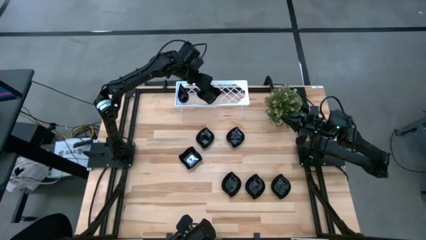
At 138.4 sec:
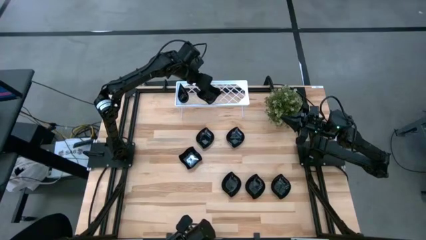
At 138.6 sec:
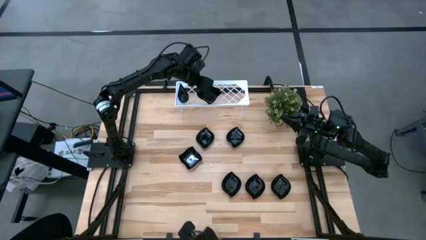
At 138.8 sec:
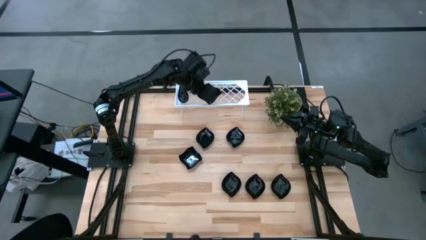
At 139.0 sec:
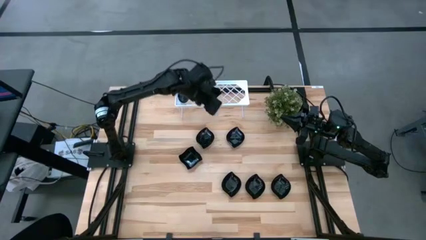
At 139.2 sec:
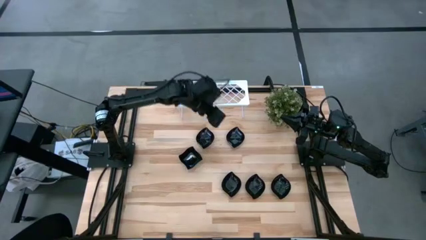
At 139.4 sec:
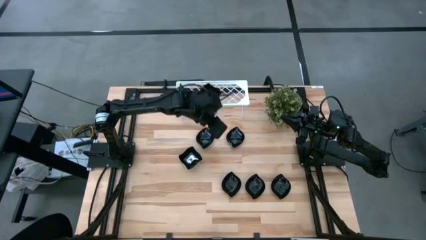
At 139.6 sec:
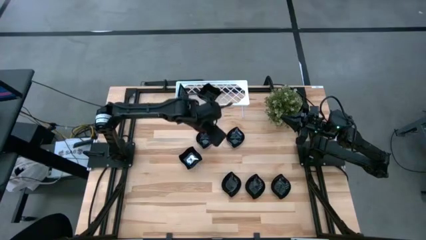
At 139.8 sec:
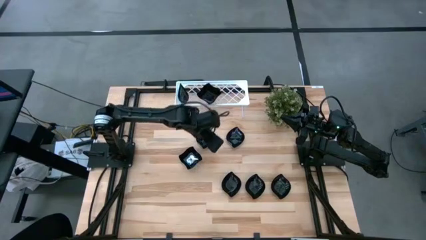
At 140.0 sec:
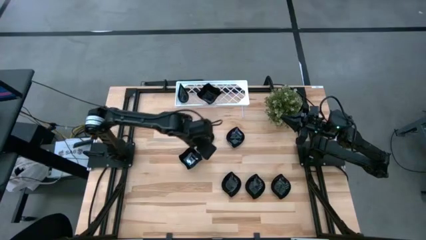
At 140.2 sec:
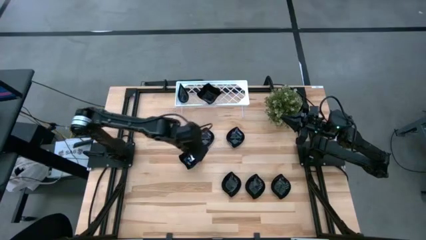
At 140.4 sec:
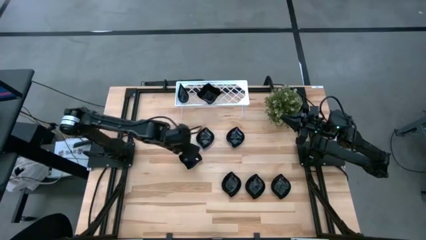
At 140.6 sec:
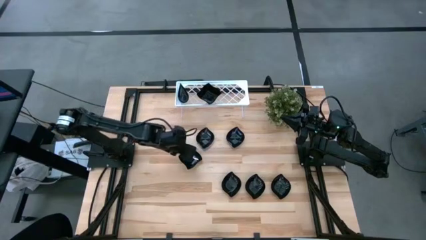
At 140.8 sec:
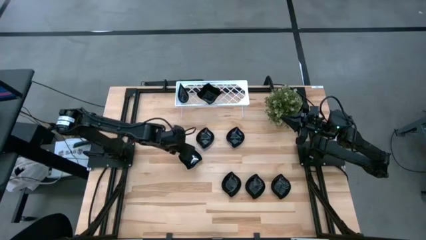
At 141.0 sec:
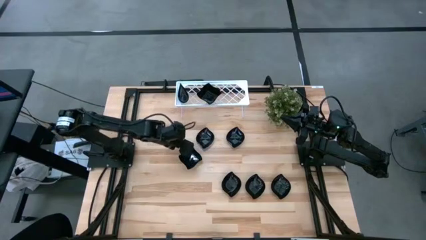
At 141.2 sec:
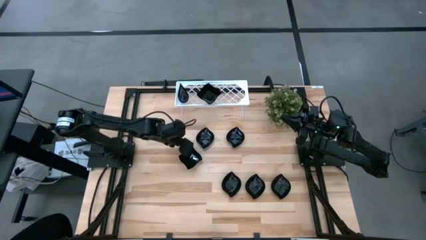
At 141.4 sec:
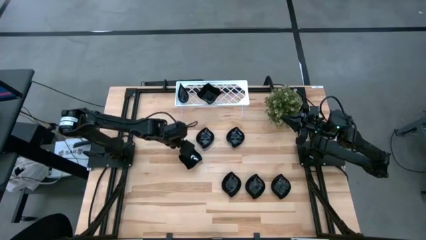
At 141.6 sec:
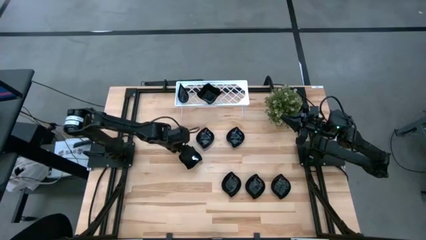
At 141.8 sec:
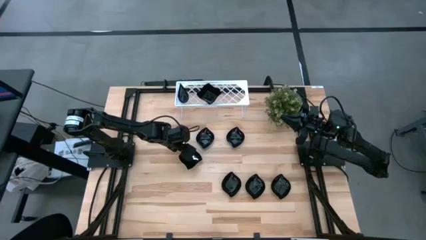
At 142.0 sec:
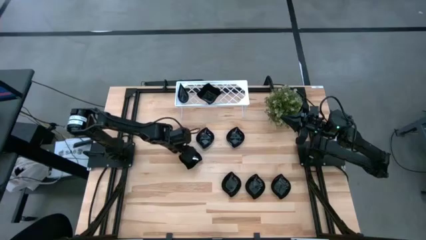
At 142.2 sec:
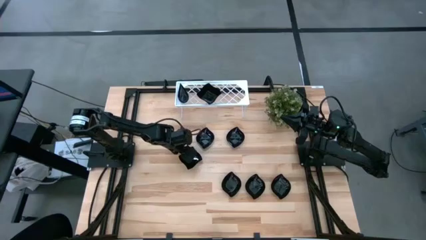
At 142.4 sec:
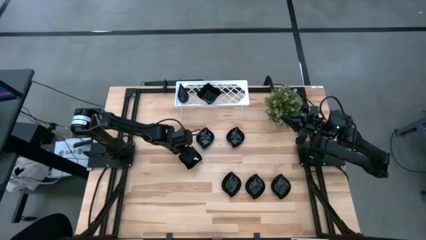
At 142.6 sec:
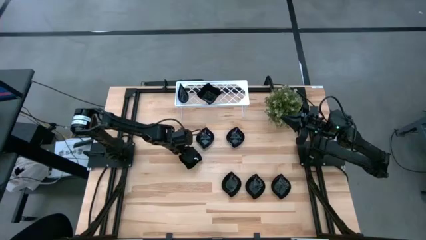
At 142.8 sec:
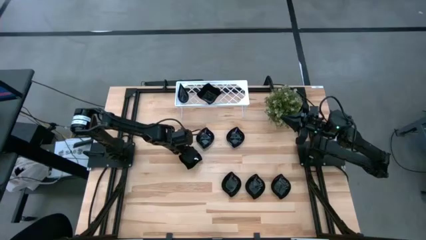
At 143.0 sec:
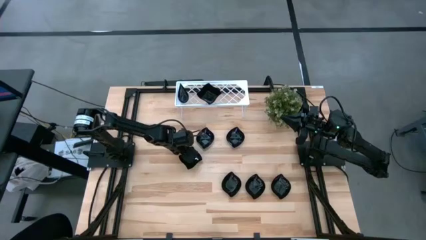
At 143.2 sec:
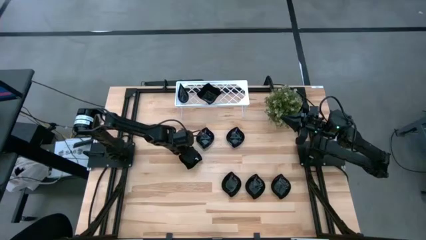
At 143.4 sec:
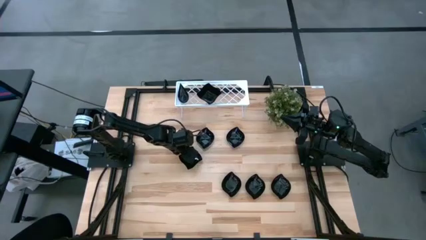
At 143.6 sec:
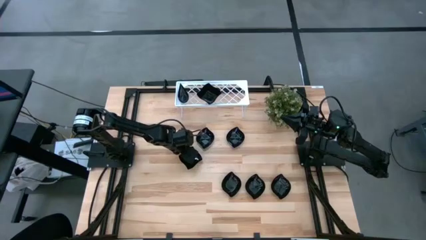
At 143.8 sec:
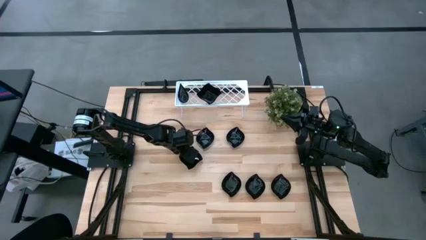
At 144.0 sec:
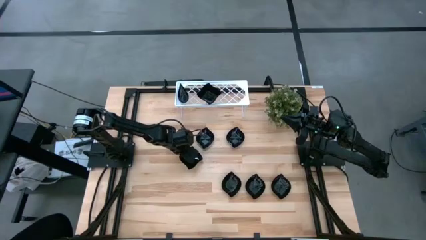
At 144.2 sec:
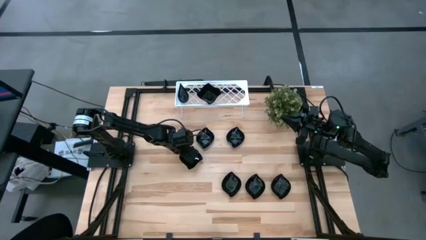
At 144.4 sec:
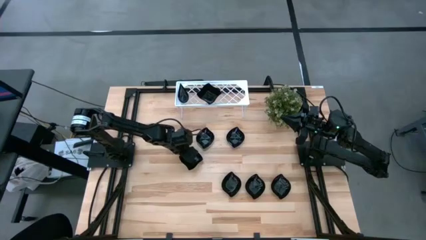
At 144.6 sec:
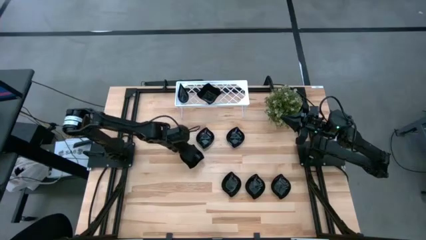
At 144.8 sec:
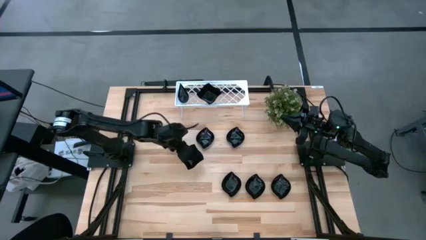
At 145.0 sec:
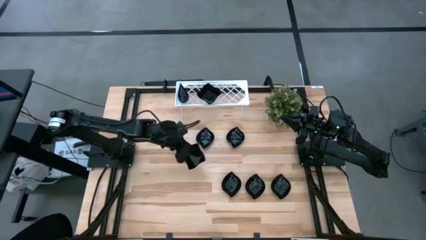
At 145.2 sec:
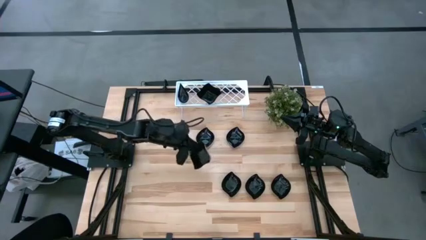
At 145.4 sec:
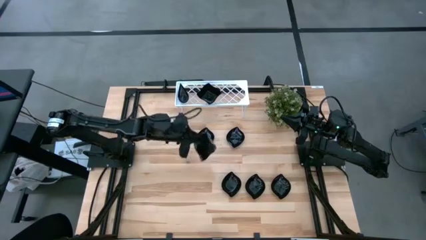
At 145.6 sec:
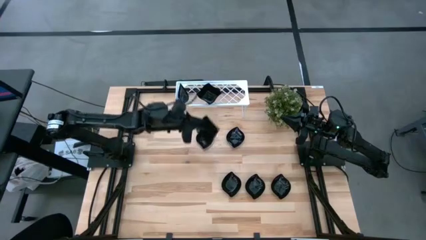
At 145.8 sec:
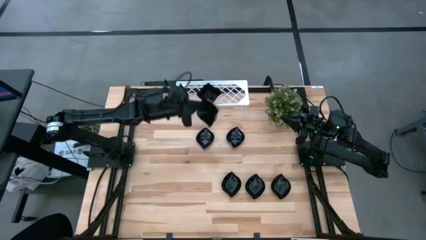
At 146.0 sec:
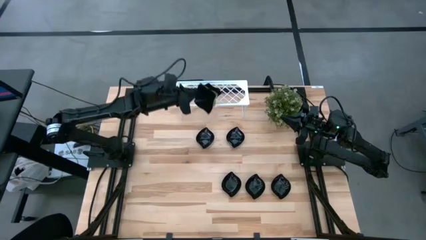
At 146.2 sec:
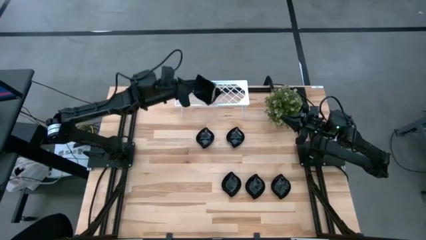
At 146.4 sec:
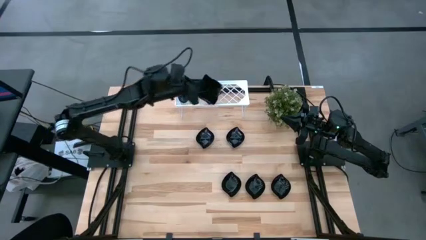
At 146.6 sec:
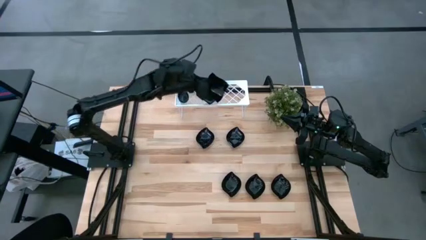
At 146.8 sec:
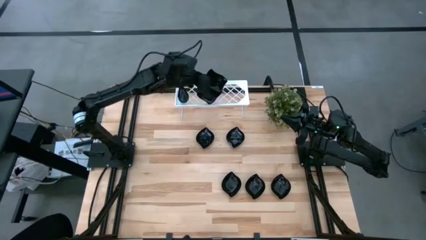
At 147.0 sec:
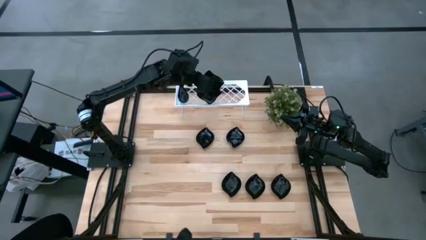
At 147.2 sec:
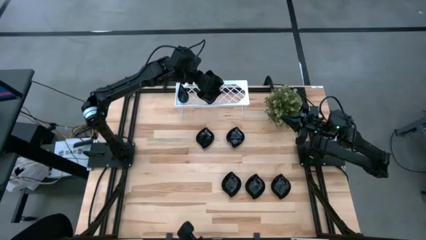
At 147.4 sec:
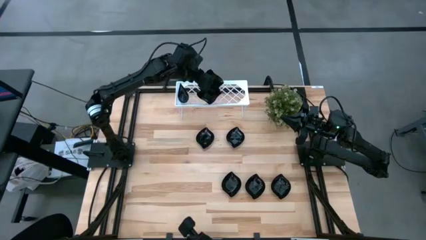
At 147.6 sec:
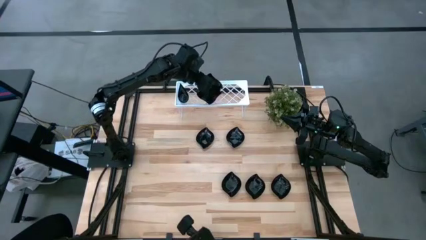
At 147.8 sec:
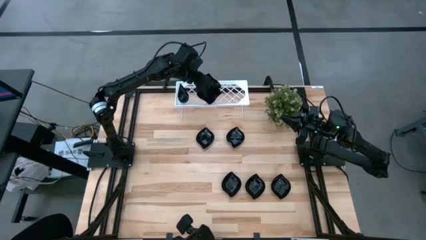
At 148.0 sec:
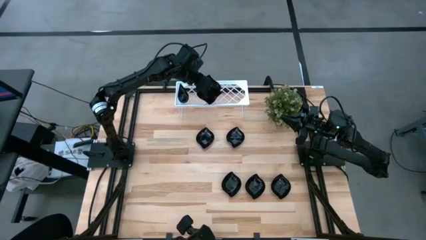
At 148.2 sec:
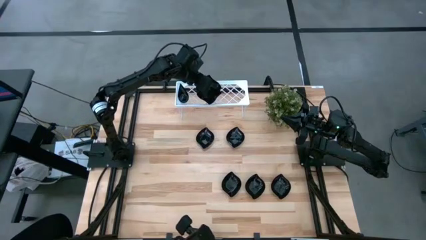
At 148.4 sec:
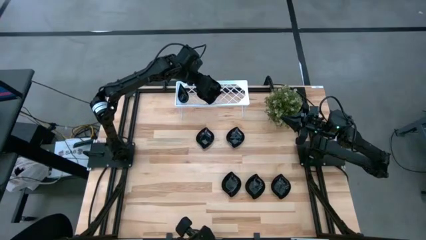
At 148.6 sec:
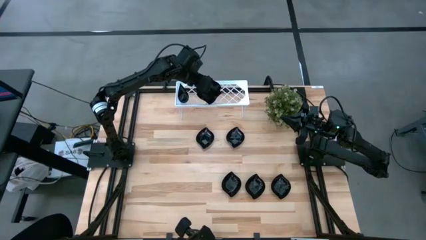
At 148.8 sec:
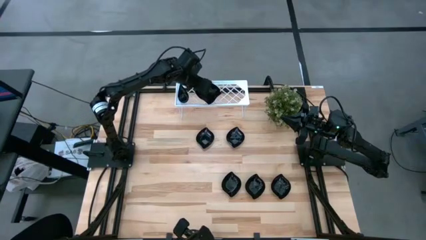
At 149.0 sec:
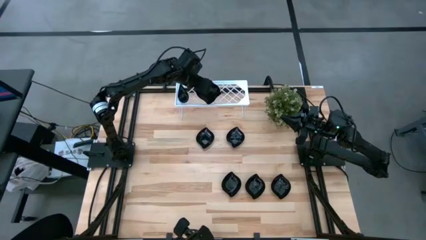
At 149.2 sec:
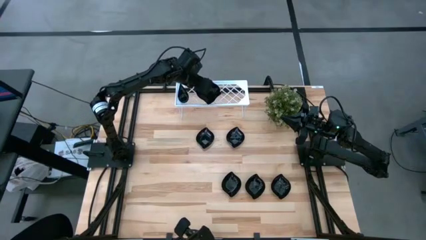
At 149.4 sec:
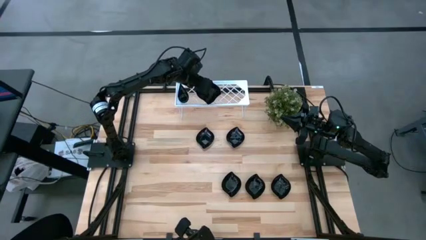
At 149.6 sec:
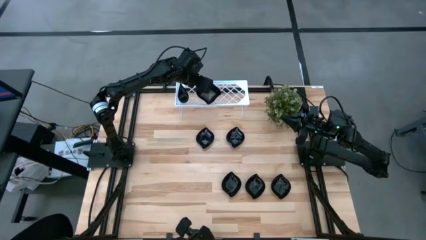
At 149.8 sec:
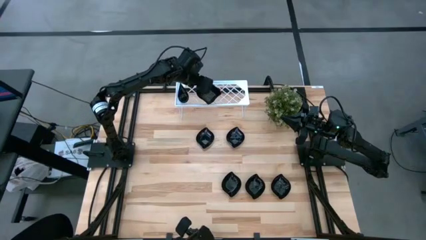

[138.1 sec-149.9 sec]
Task: Pick & Place Mini shaped plates
Stack the distorted square-shaped plate on top of the distorted square-shaped plate on the shelf

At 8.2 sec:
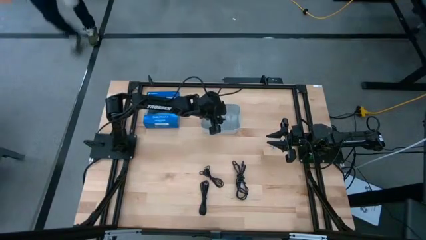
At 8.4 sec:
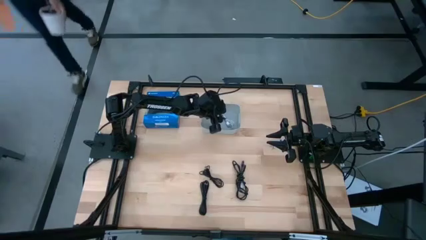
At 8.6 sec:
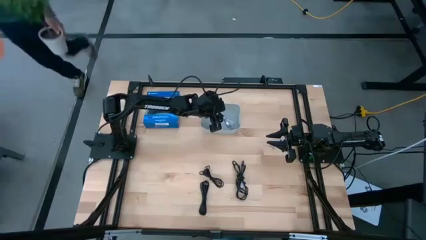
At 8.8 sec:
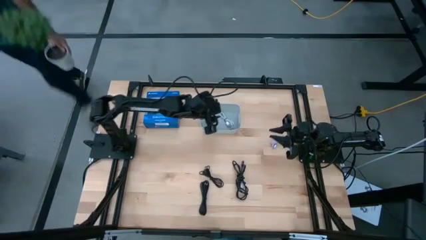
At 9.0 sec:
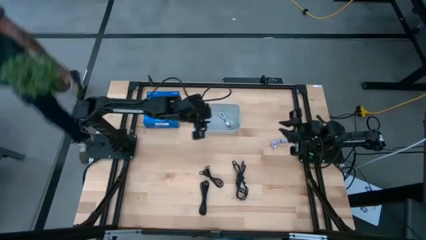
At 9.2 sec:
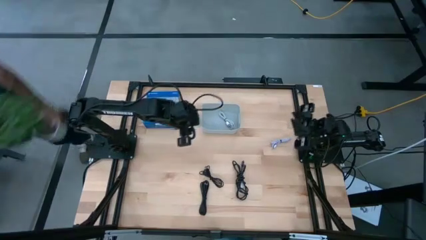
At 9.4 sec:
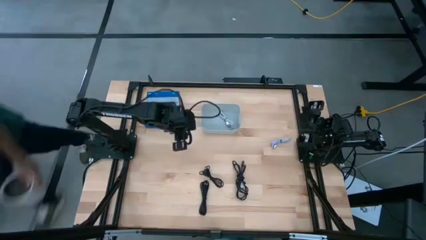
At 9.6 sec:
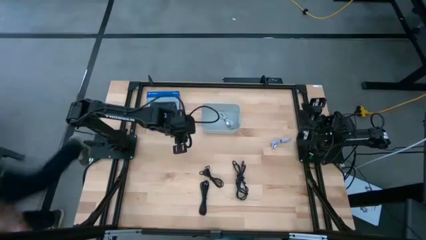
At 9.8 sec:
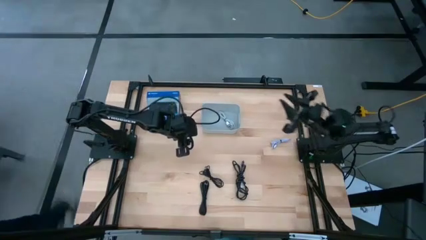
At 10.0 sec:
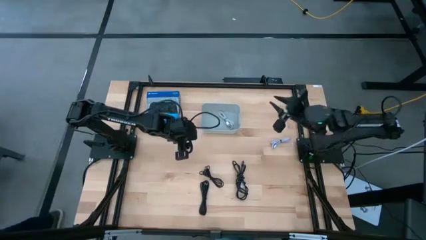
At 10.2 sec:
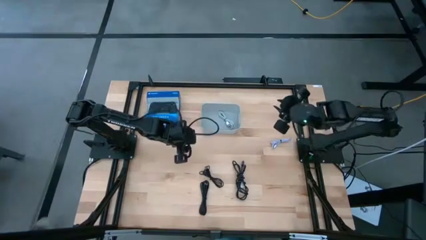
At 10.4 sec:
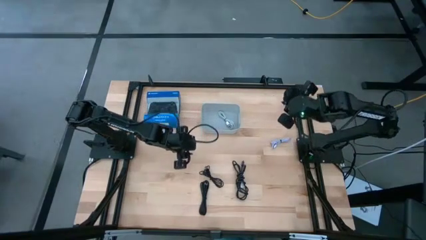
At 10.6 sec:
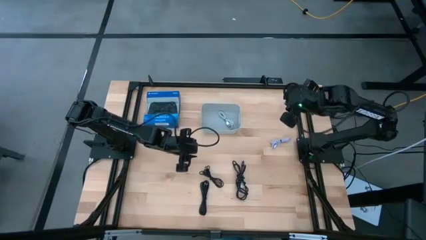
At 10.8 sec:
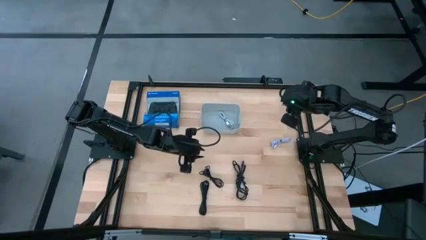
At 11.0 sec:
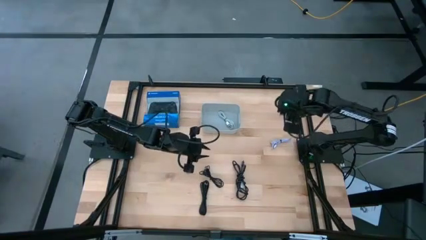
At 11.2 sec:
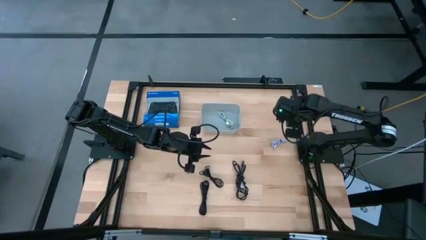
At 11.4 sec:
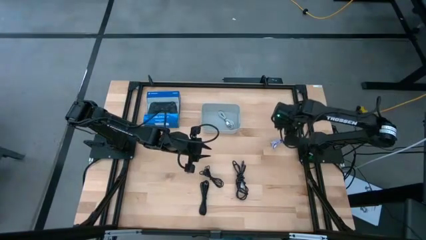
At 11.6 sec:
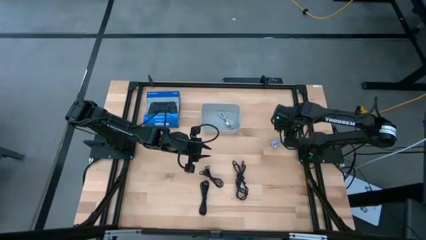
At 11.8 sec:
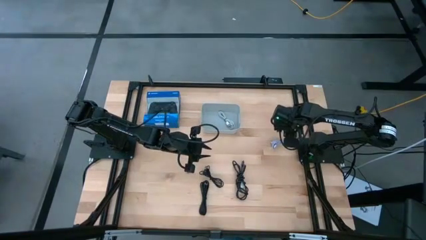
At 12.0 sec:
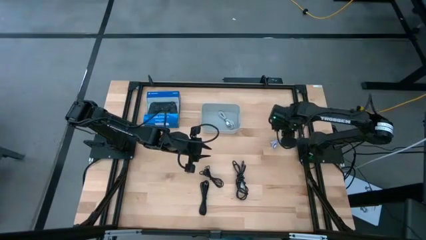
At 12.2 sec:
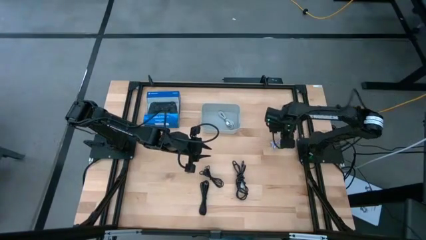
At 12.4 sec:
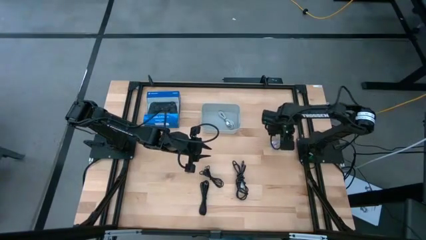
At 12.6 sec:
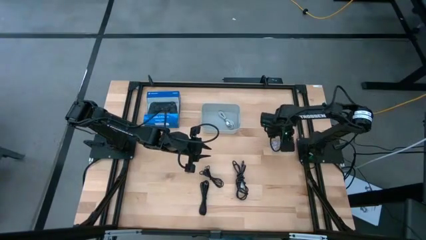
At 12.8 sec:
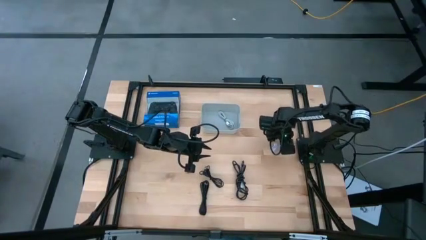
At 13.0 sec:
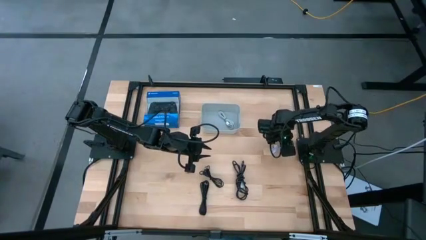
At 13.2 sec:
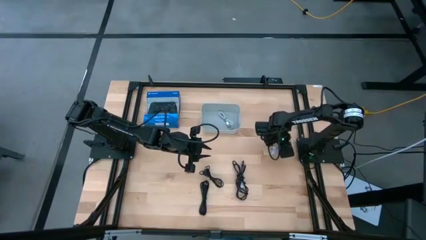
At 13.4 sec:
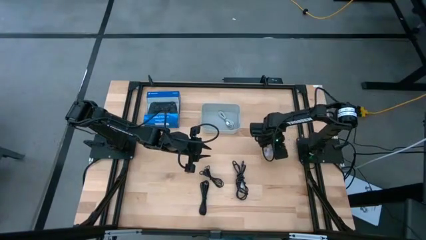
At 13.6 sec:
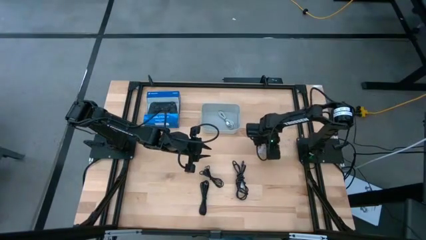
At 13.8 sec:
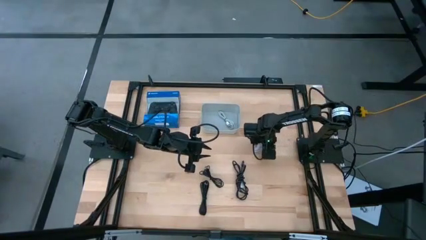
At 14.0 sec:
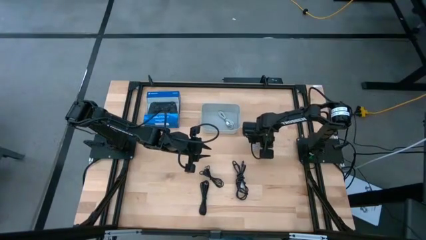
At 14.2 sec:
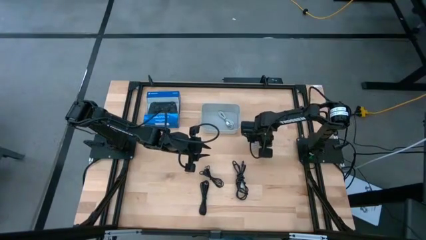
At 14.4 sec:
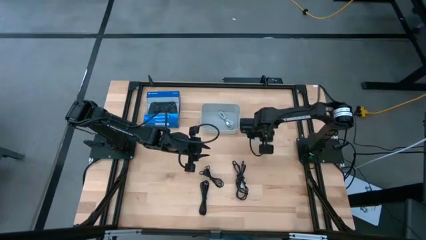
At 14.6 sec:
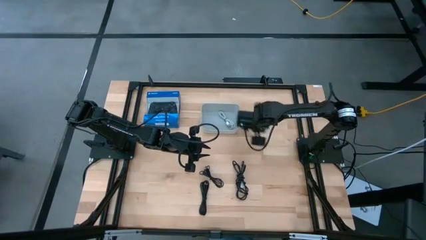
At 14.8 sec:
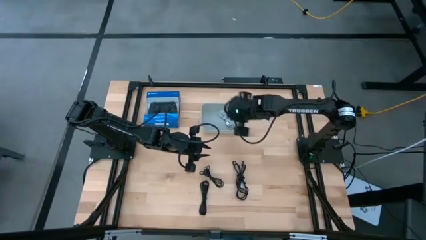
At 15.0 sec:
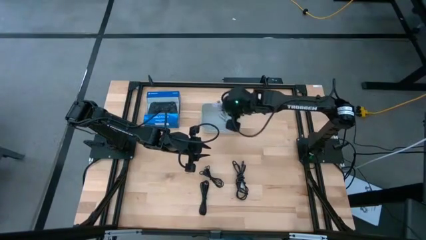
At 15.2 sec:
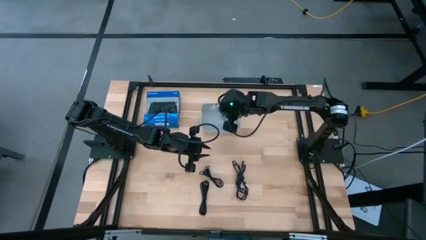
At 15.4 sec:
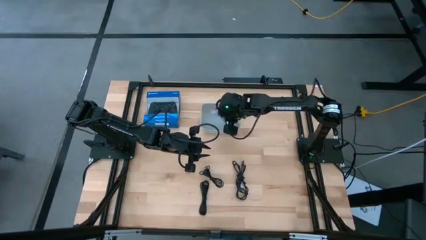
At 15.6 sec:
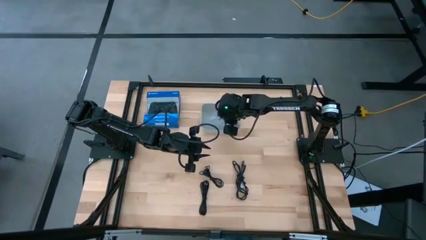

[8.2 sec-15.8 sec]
Task: Pick and place USB-C Cables
Put the purple charger cable into the white bin
